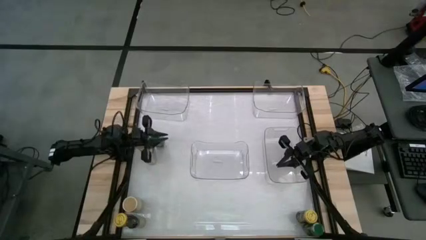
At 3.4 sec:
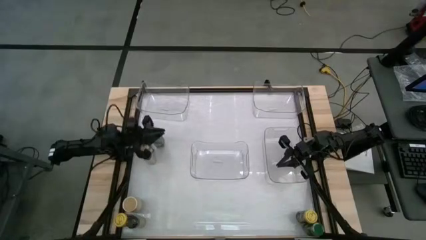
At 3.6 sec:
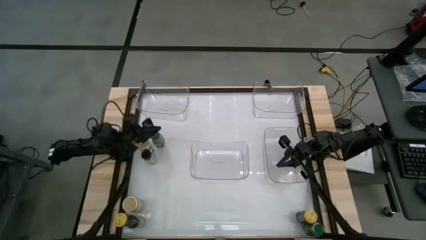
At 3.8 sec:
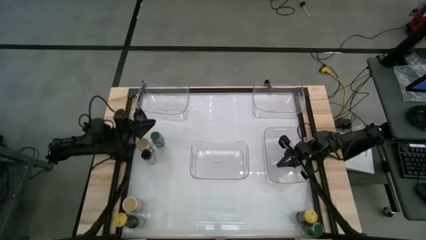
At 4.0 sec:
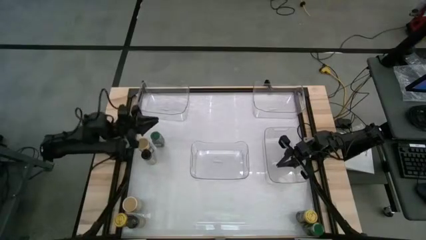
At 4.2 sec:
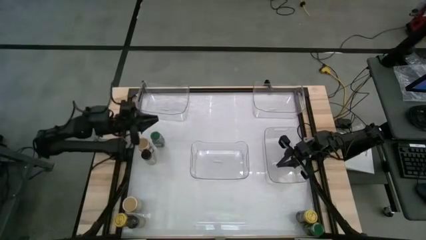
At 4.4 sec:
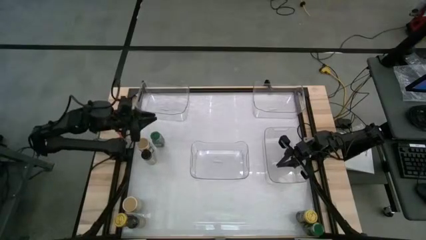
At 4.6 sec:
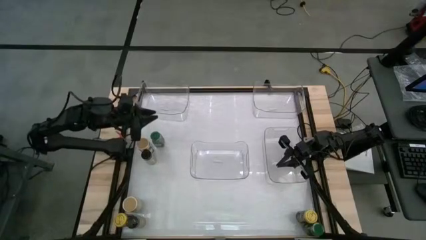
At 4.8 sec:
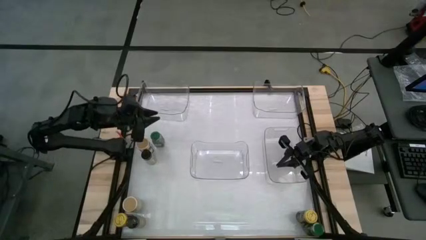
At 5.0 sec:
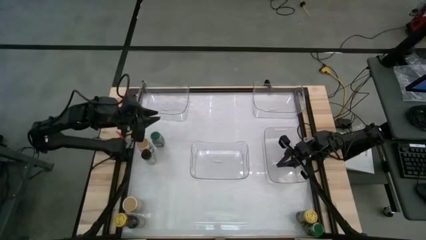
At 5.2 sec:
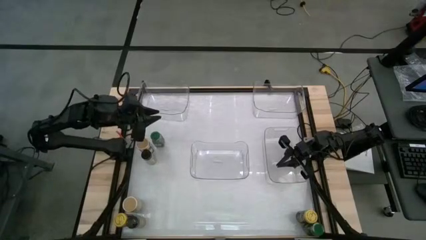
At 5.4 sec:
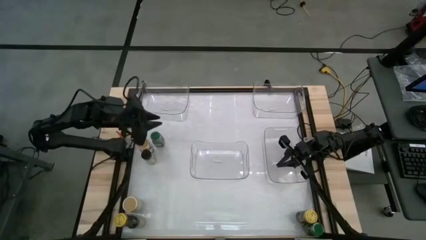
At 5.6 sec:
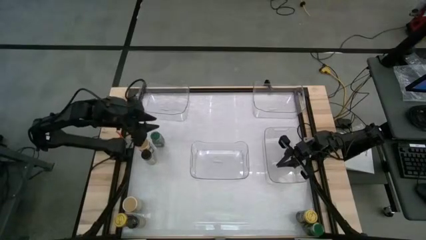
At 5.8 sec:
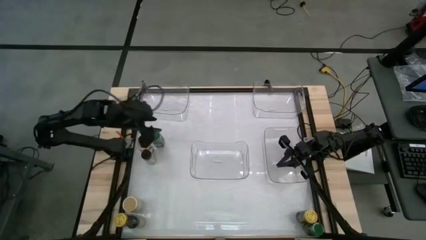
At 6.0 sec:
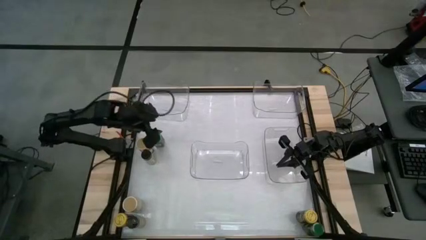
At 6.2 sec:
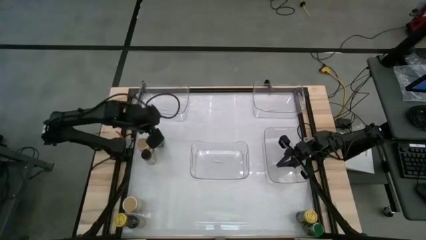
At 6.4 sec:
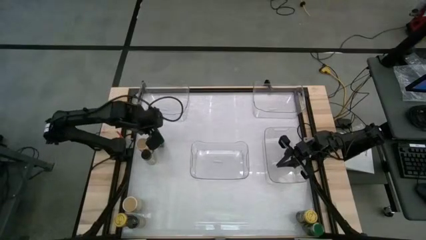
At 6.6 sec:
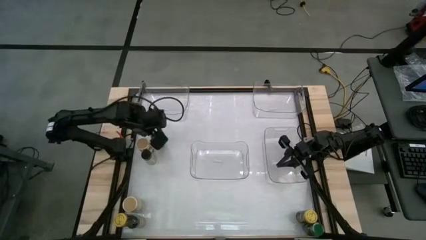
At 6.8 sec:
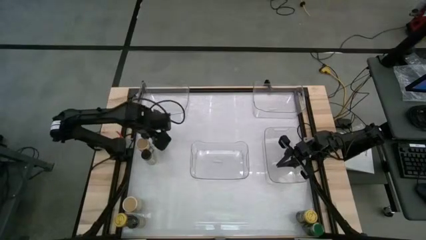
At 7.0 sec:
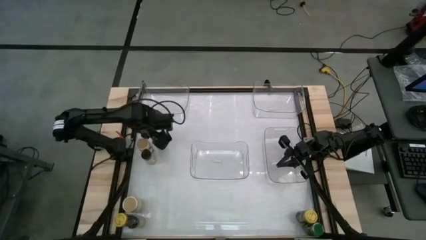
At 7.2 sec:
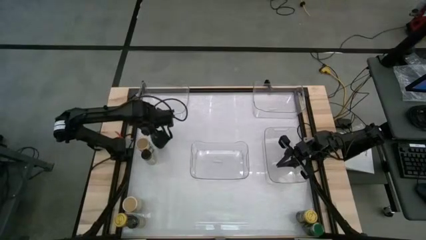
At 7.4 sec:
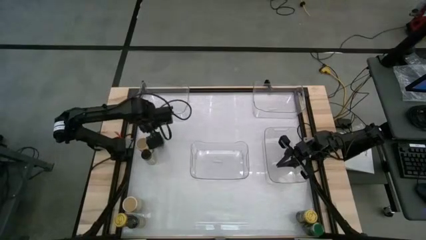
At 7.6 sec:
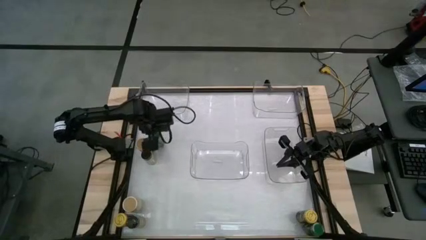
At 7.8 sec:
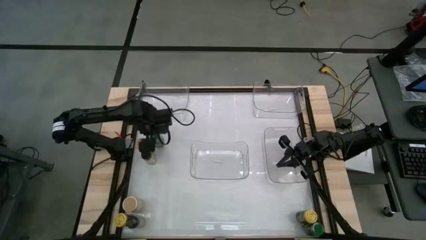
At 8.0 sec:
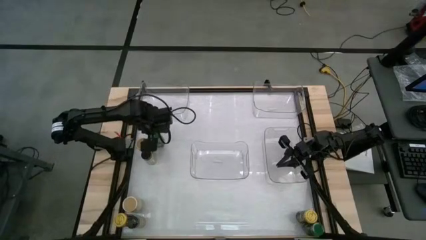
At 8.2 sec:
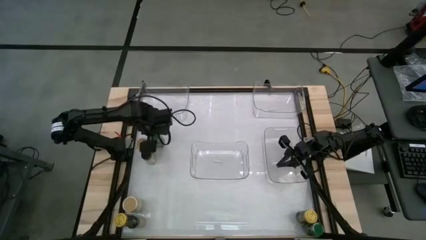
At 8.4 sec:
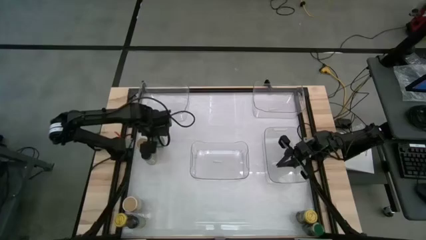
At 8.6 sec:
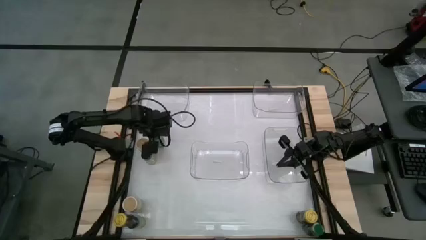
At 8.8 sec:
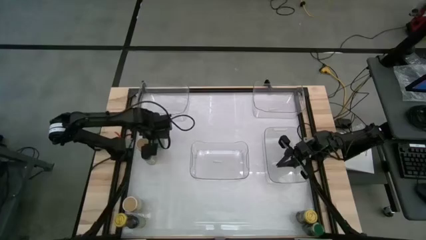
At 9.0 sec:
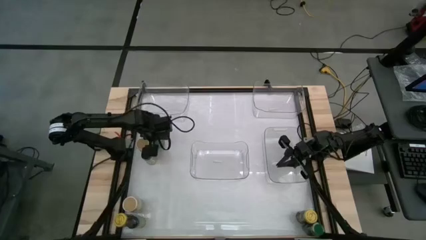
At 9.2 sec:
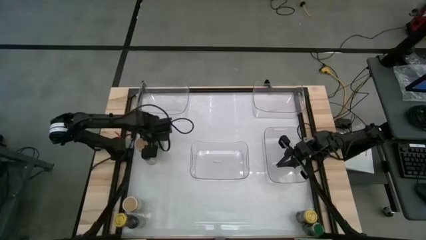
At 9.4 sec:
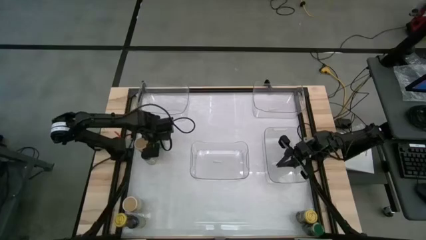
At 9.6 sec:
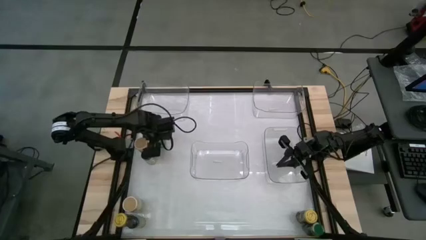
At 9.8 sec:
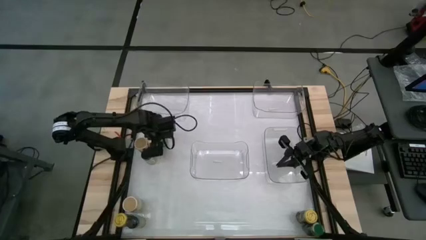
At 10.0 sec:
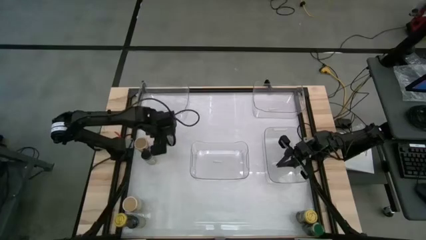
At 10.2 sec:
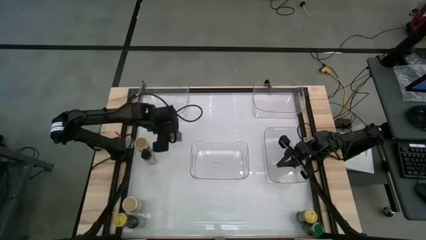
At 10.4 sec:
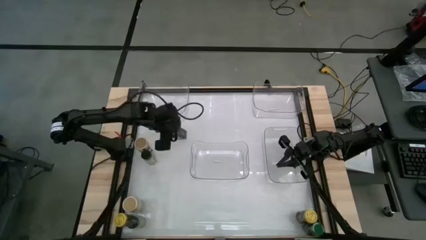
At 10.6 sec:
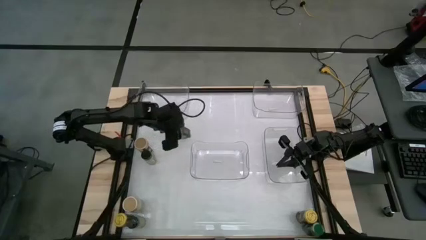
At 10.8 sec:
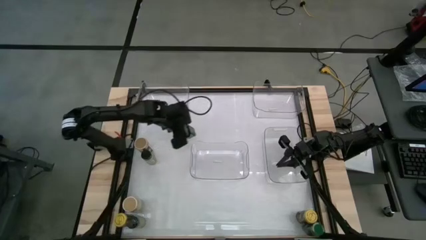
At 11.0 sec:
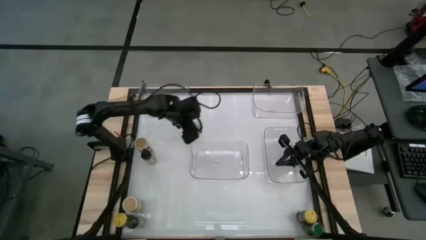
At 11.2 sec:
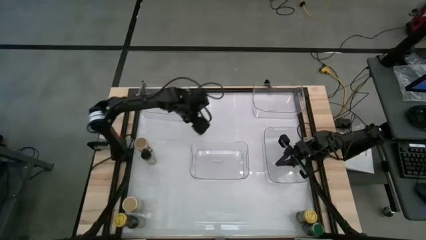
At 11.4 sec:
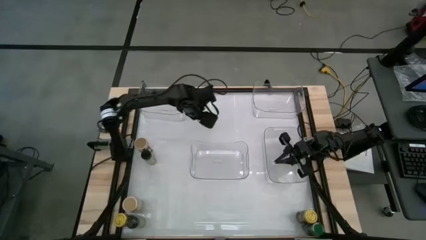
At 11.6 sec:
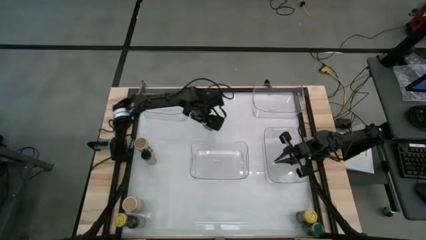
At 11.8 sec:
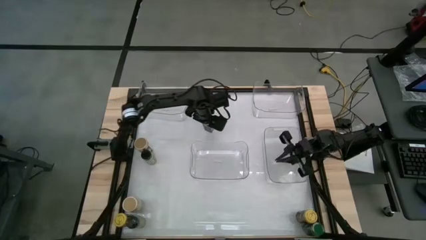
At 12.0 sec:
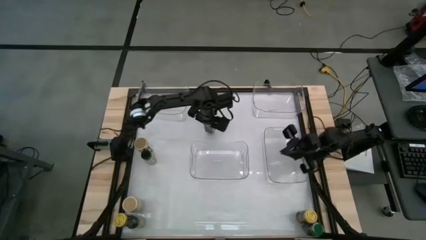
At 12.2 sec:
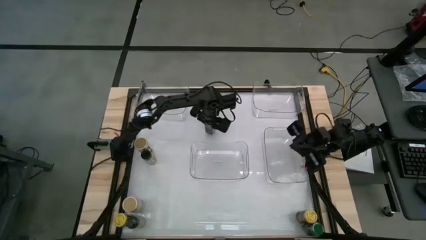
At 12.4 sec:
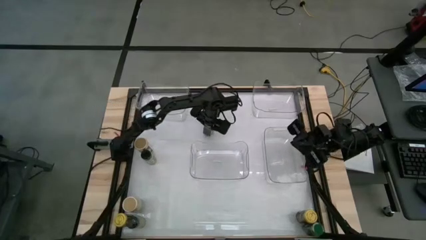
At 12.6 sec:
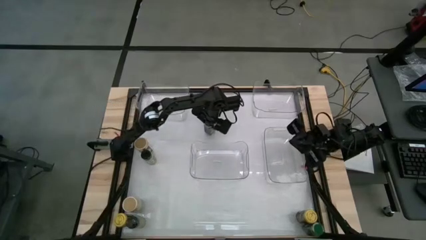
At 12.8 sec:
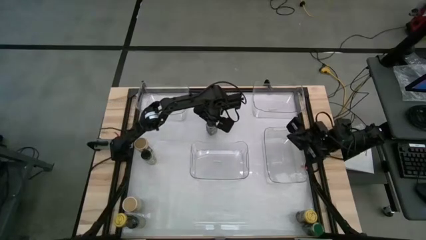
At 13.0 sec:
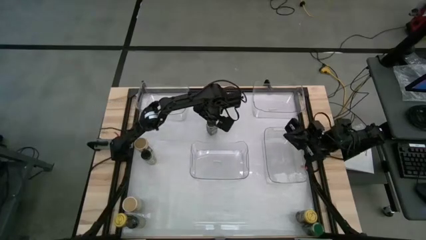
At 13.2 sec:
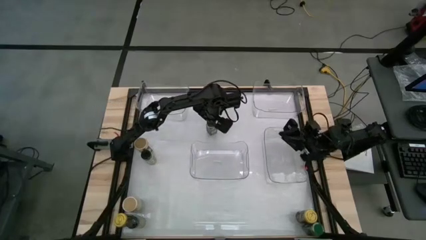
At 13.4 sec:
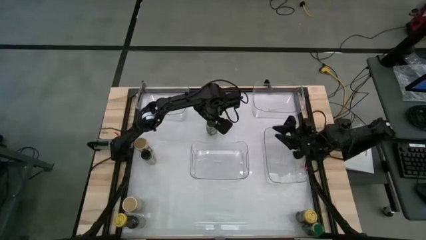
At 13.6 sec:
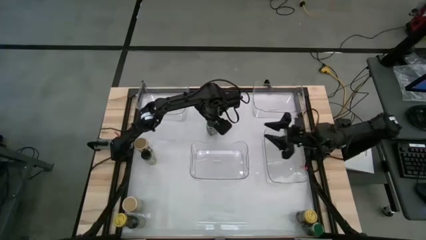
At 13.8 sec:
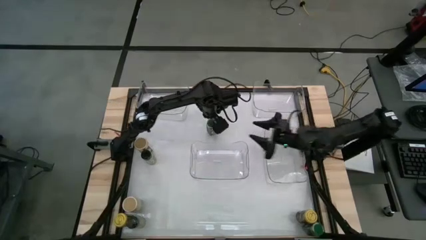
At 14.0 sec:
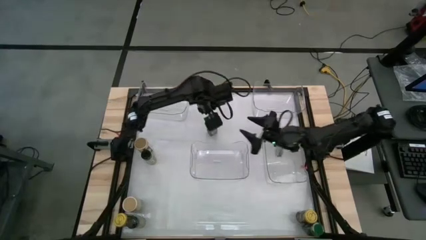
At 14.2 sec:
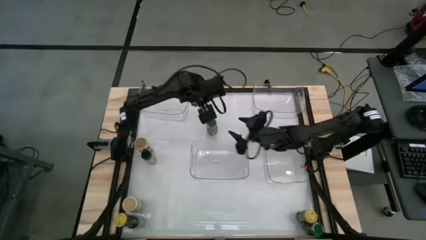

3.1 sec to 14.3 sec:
Task: Sort spices by type
Put the top green seasoning bottle into the bottom left transparent bin

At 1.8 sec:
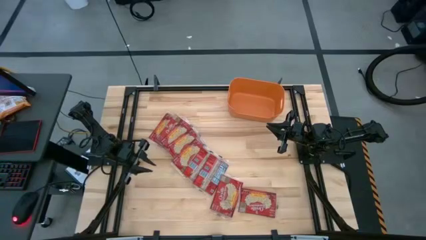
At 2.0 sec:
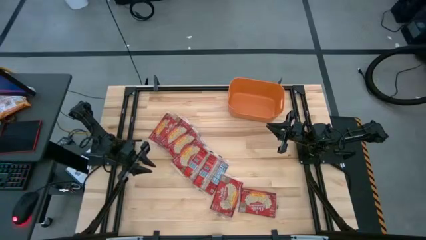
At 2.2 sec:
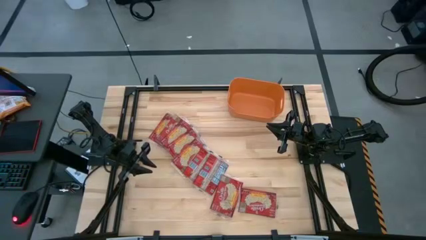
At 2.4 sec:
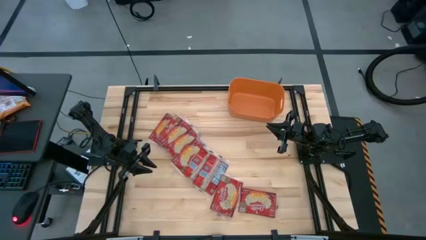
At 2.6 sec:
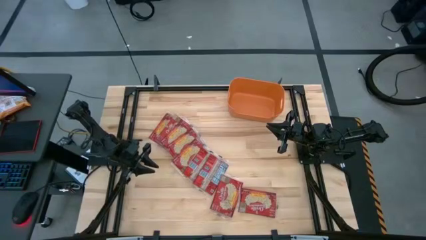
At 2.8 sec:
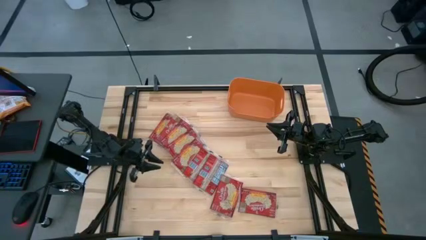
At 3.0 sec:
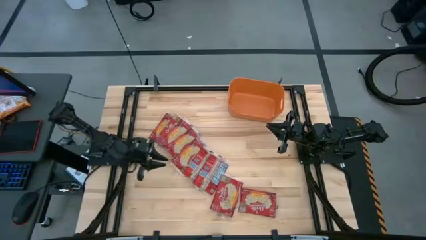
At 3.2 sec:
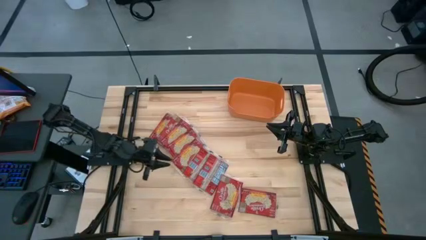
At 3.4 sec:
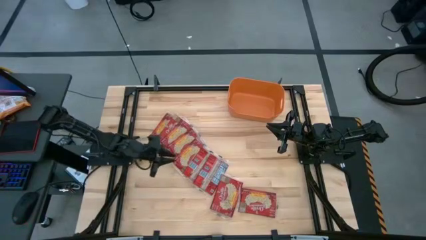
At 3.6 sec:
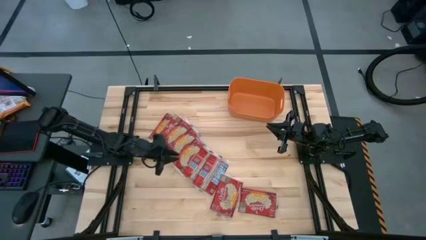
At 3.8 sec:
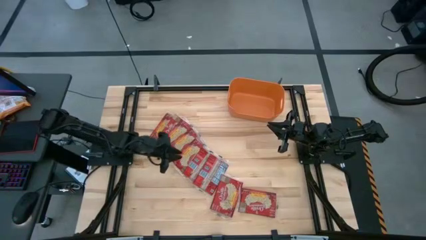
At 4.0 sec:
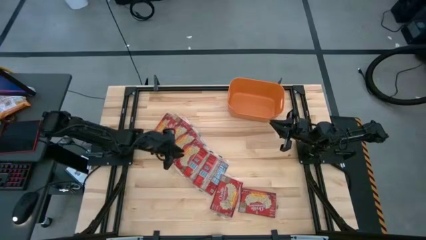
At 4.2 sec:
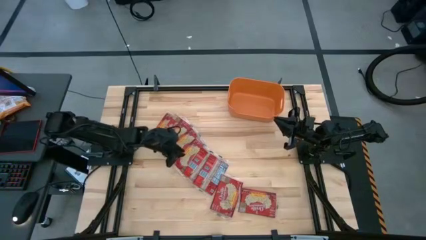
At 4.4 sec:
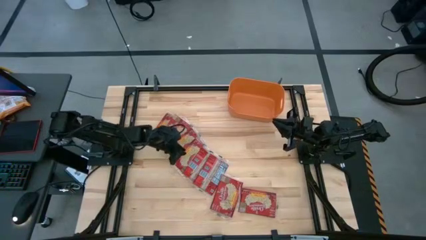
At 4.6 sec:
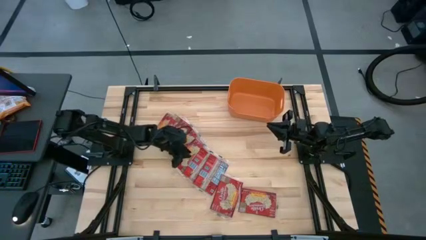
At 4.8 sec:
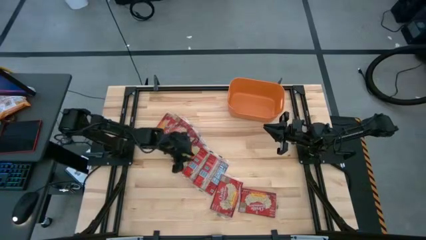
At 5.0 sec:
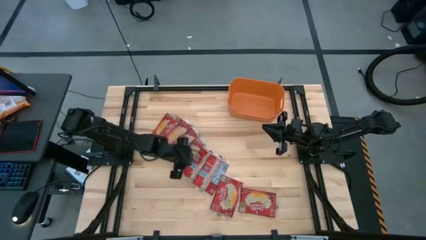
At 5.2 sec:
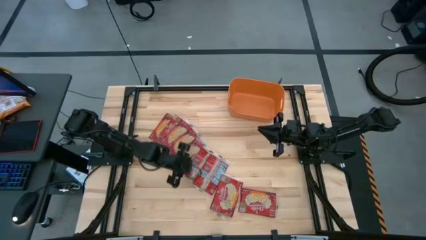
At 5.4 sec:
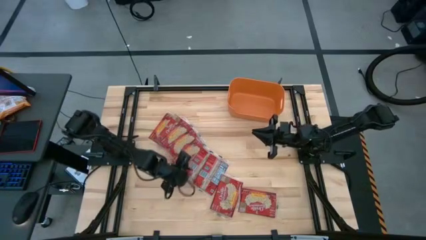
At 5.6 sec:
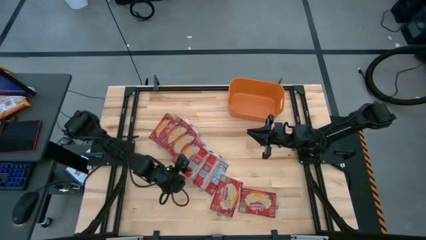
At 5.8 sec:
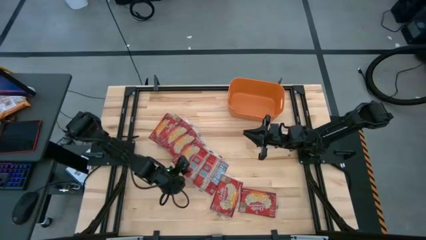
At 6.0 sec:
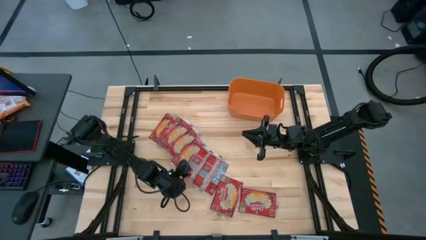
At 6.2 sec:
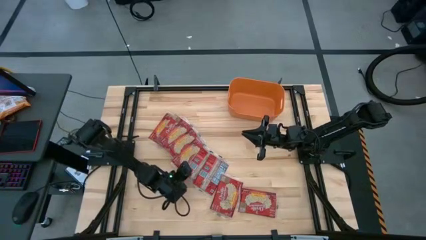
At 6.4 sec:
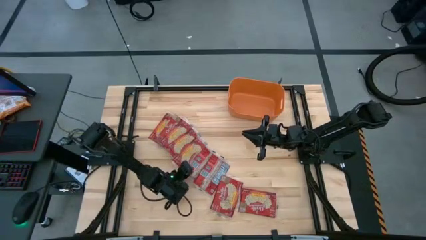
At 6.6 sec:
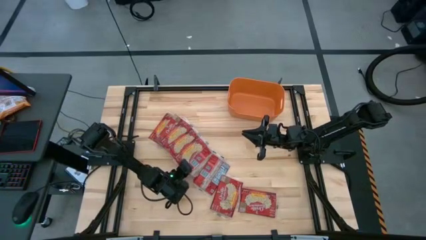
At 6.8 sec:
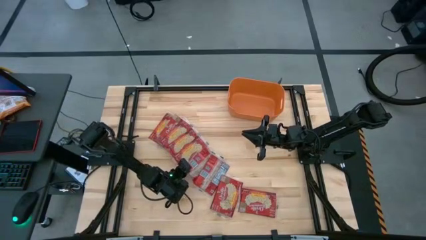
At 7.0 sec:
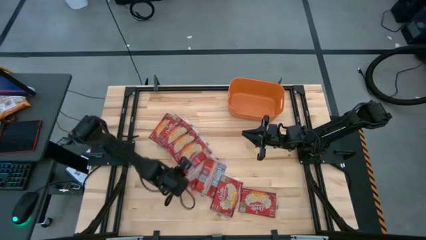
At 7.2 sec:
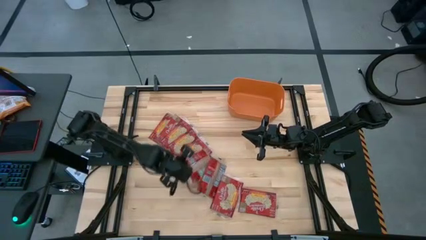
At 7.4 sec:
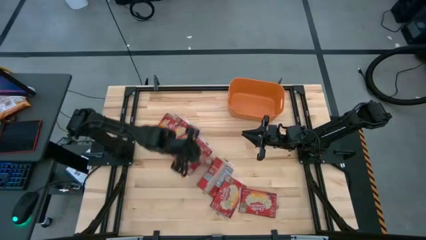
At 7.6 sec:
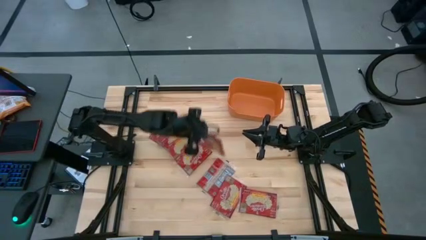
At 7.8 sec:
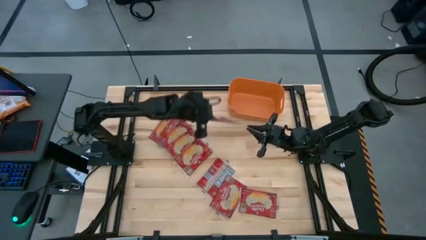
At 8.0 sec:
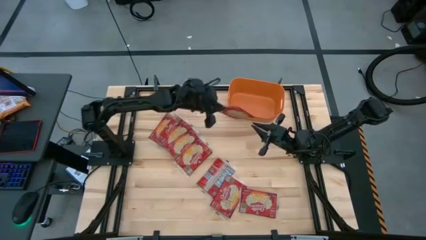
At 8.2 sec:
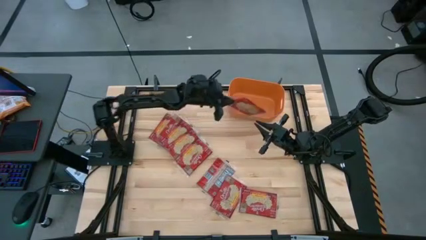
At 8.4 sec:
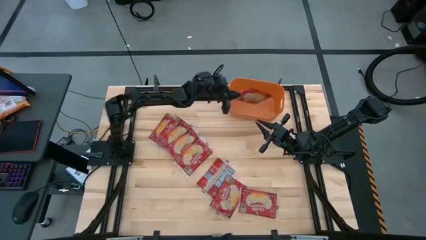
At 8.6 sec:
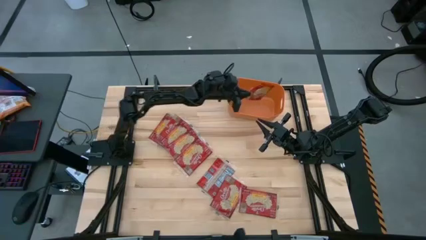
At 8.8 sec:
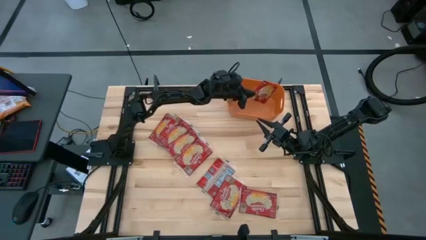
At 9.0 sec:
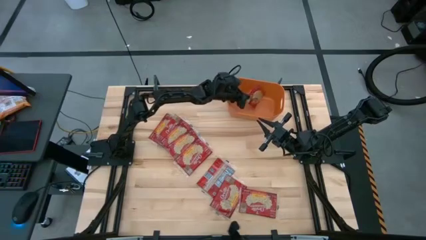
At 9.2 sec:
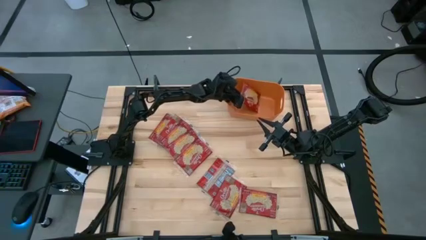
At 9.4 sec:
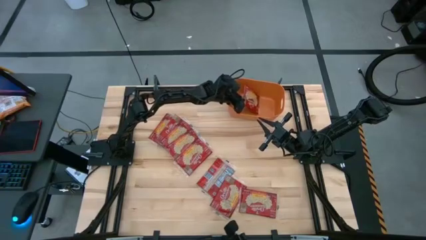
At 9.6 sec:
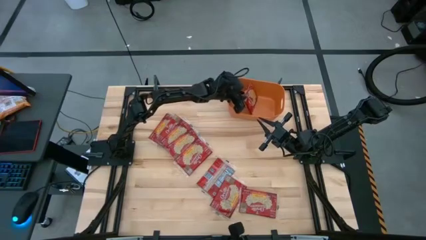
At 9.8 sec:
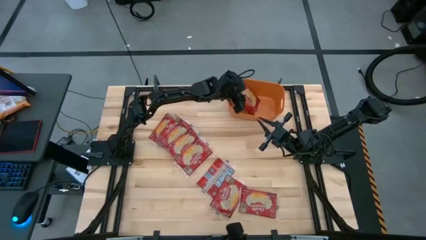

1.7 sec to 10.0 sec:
Task: Sort popcorn bags into baskets
Put the popcorn bag into the bin
